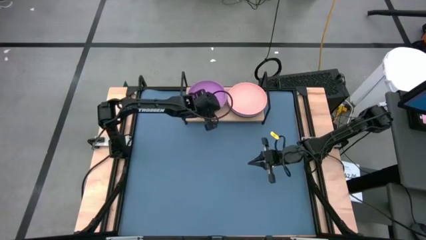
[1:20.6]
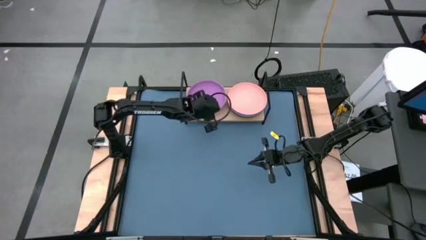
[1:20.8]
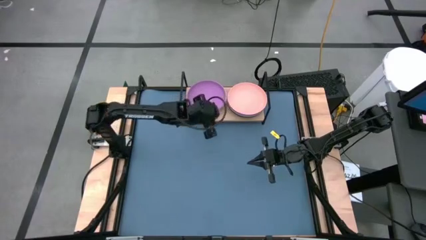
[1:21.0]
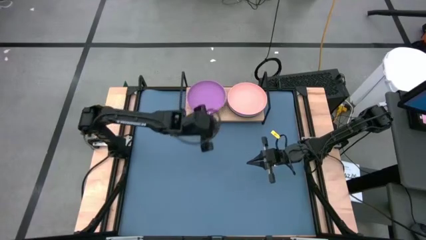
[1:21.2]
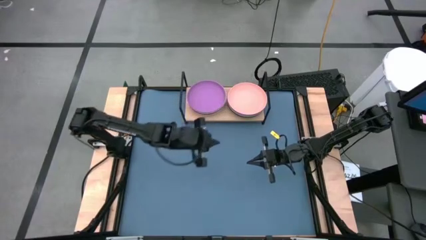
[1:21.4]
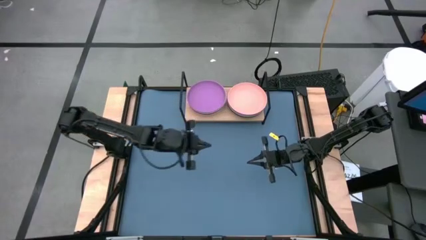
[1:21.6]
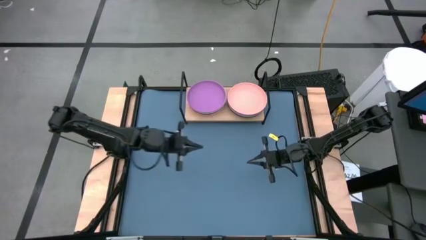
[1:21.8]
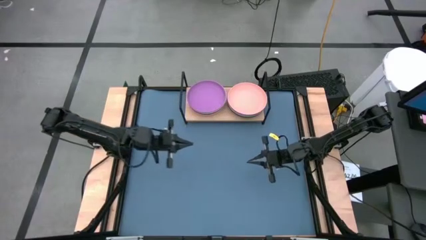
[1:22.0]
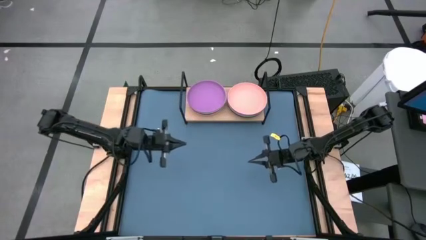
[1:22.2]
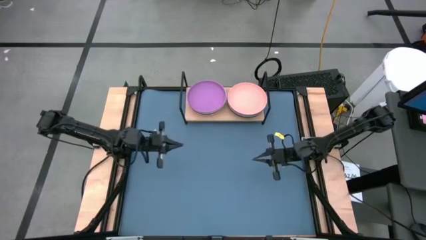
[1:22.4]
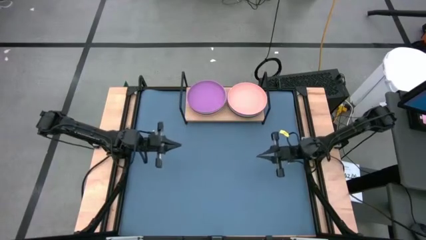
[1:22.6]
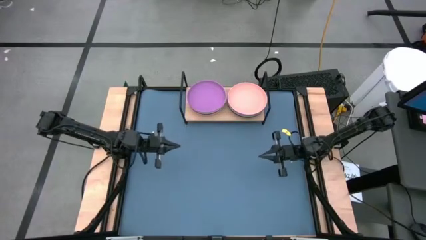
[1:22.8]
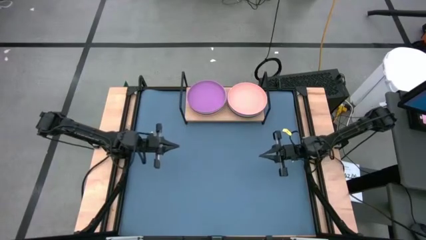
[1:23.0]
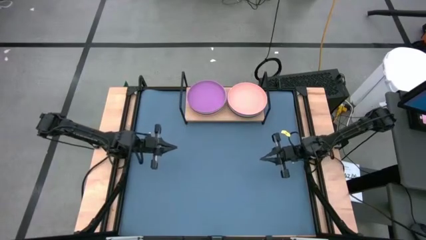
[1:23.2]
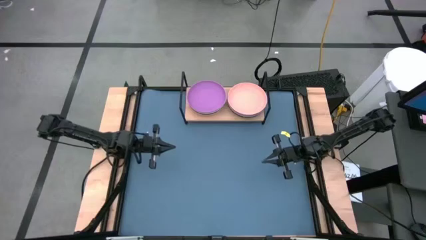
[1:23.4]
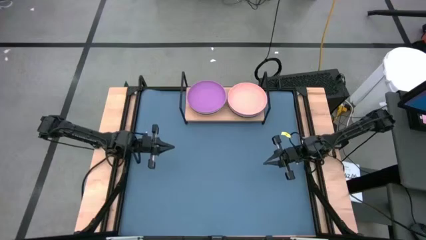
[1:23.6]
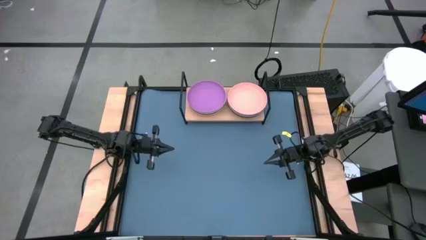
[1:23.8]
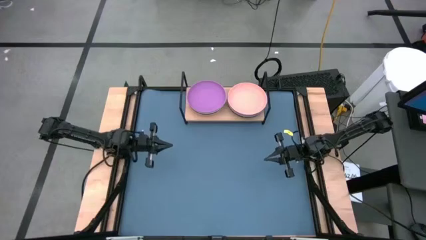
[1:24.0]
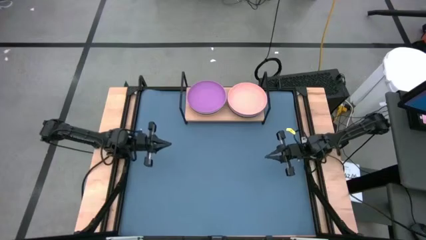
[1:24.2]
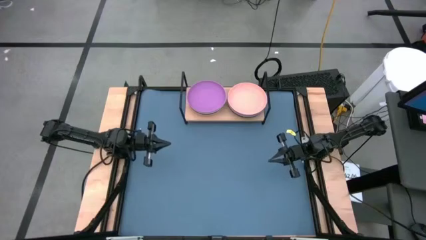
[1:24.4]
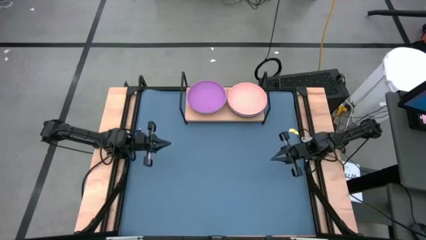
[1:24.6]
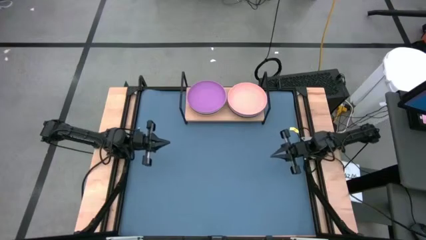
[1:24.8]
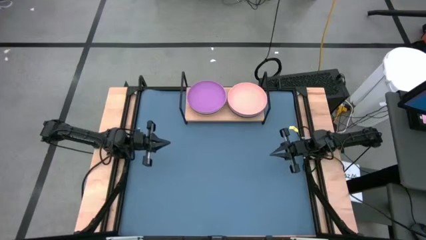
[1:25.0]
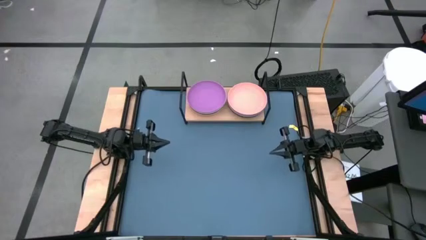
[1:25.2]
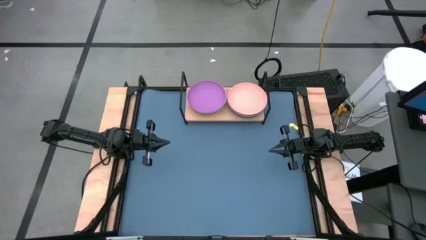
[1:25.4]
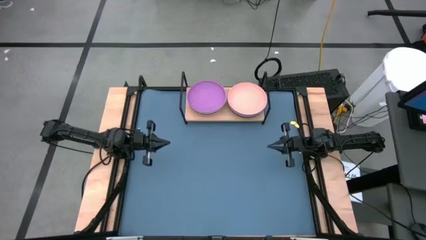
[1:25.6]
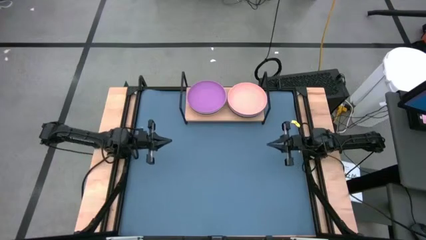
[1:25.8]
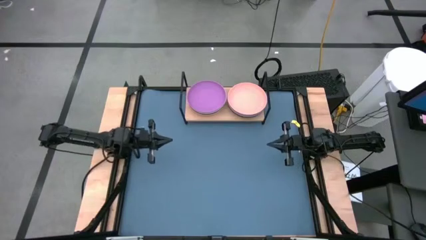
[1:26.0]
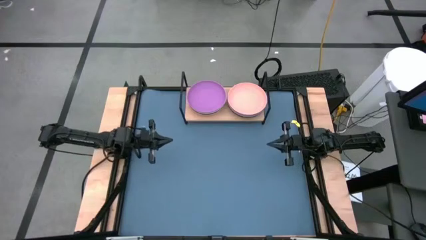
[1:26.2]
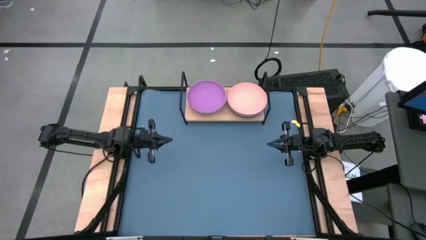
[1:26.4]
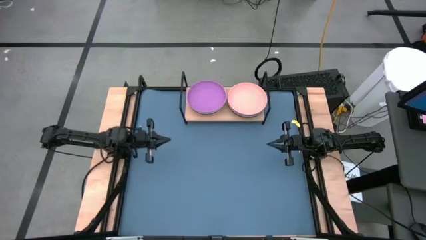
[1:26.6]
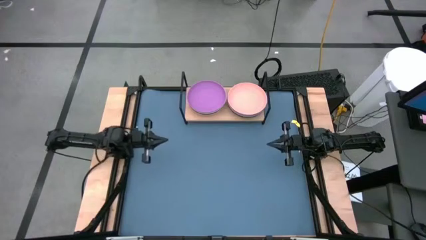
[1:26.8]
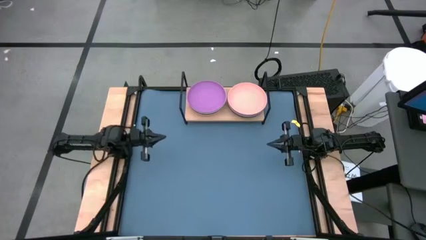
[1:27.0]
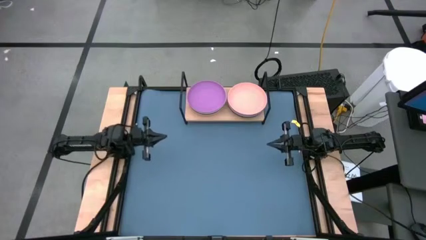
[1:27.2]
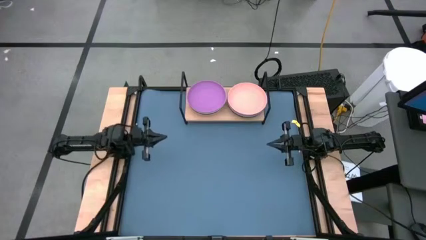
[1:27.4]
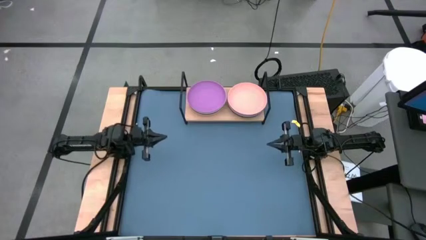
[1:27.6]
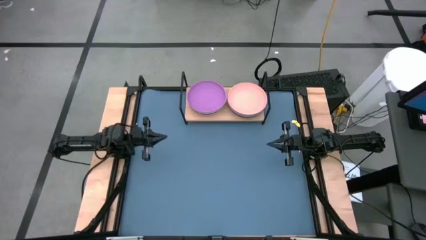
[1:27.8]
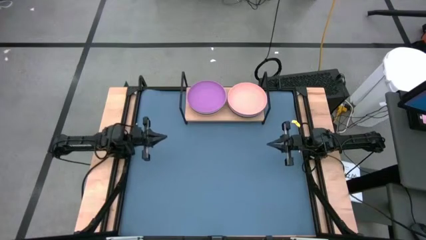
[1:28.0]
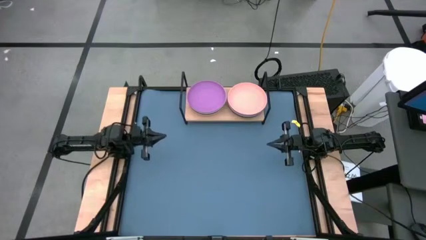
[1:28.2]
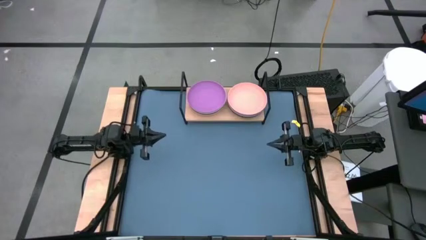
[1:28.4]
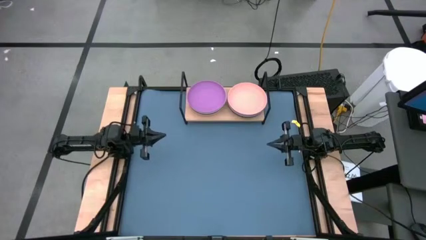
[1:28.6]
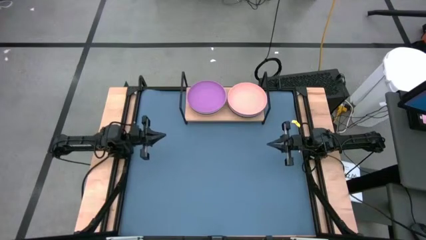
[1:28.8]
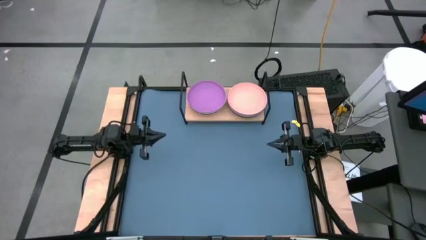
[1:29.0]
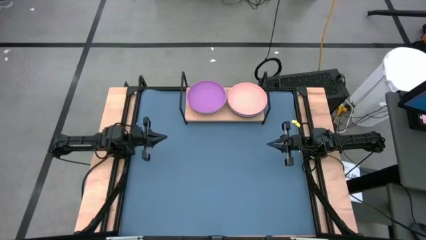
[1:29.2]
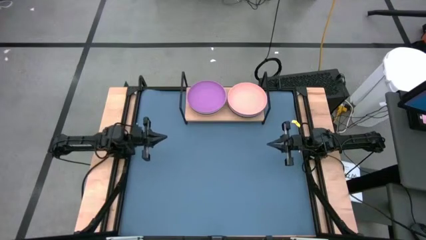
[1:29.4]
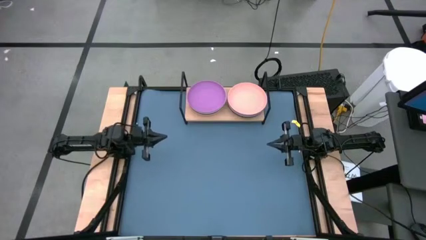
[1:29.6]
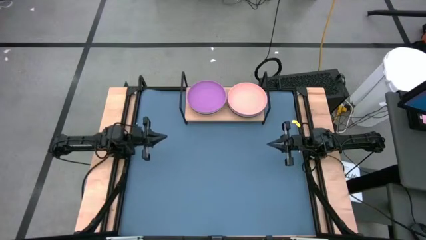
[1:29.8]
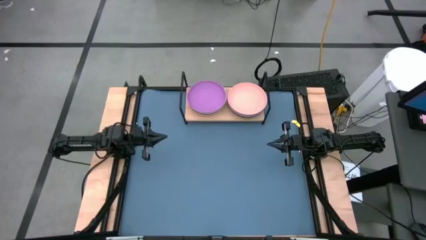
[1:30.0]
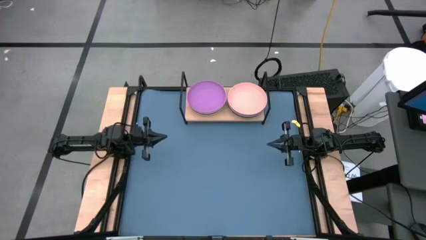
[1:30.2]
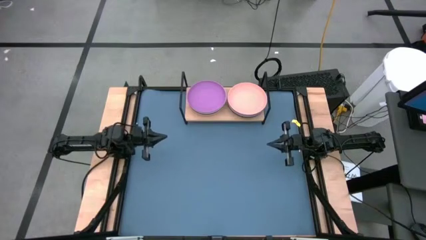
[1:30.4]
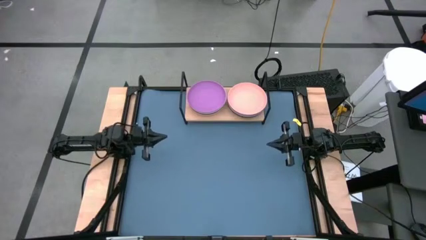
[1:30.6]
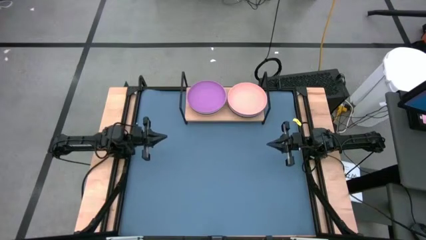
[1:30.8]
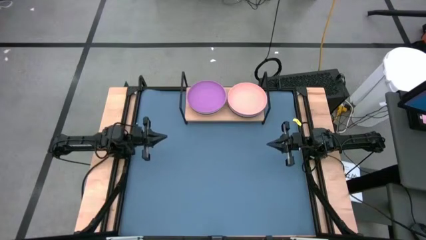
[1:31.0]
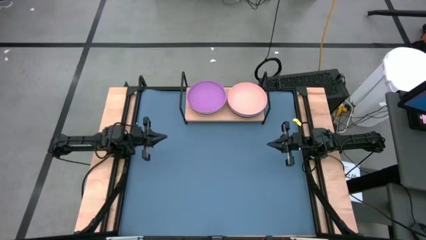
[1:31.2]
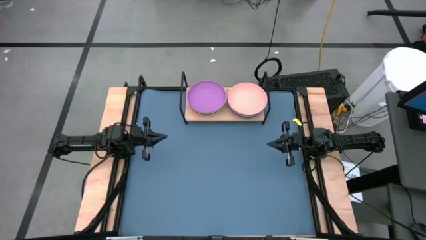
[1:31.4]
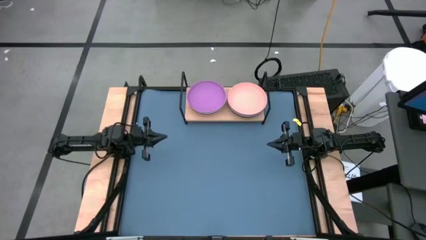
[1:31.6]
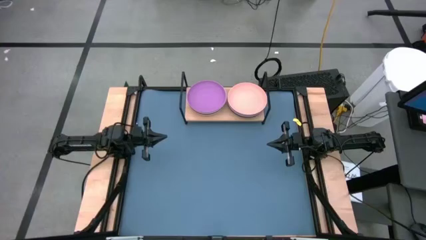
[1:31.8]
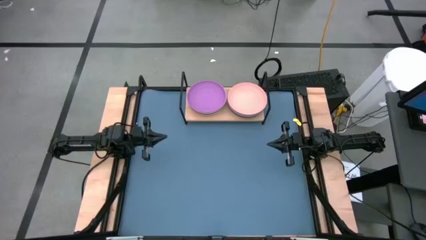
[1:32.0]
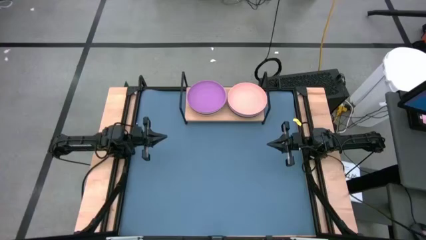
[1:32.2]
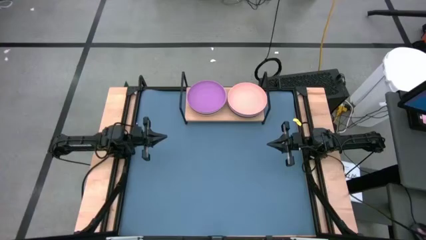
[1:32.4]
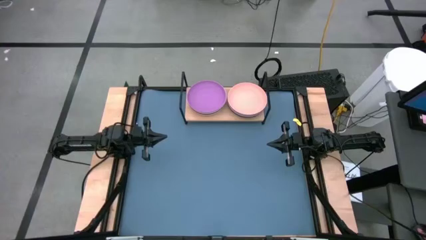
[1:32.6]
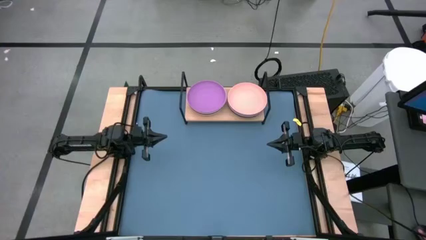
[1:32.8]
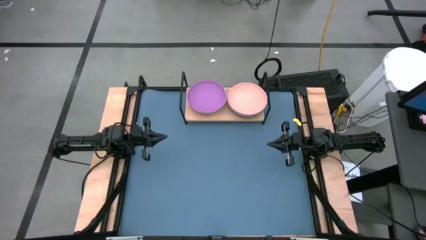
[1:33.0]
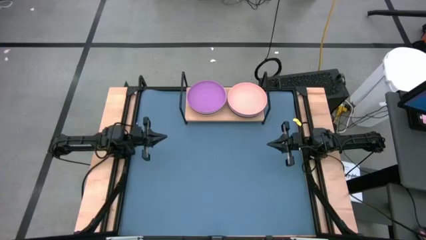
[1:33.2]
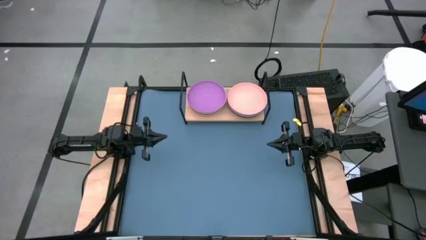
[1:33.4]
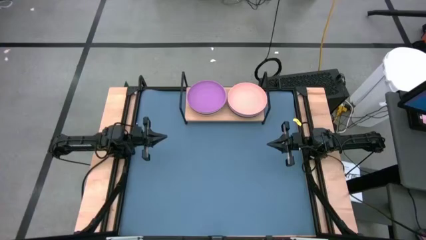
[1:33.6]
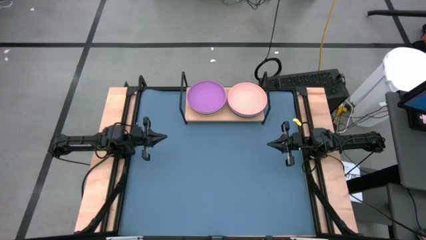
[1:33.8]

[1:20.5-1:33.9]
Task: Place and stack plates onto a shelf
Return to Home Position

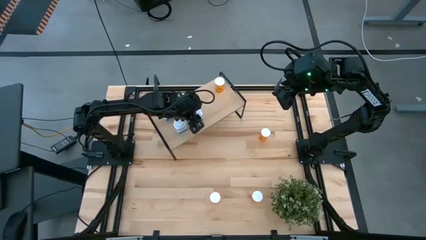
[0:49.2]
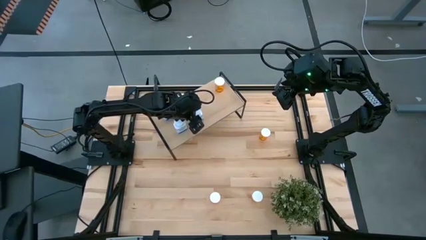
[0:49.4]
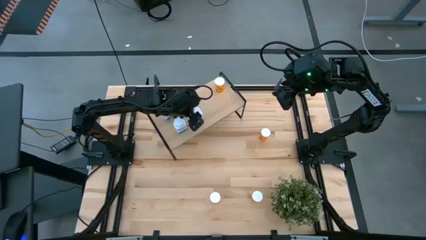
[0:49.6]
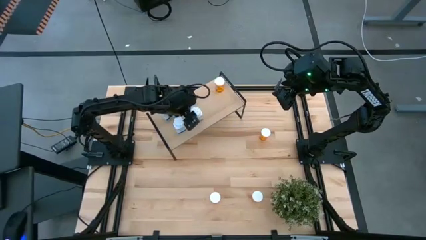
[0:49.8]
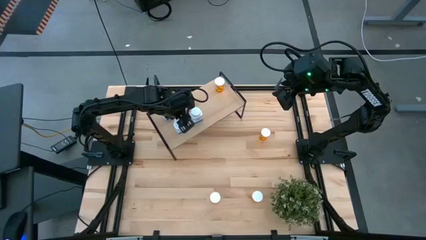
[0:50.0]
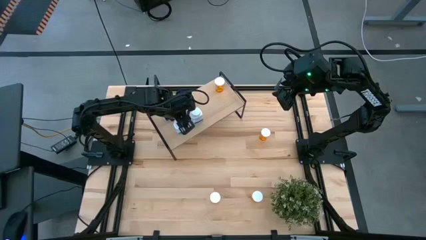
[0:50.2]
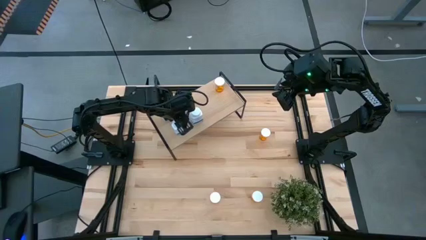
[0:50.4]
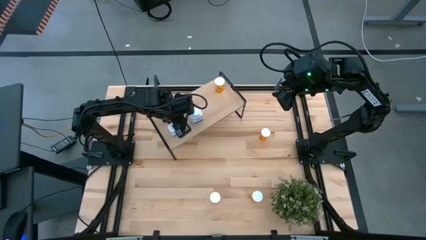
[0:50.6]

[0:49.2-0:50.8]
Task: Pick and place medicine bottles onto shelf by color
Adjust the white pill bottles on the shelf
